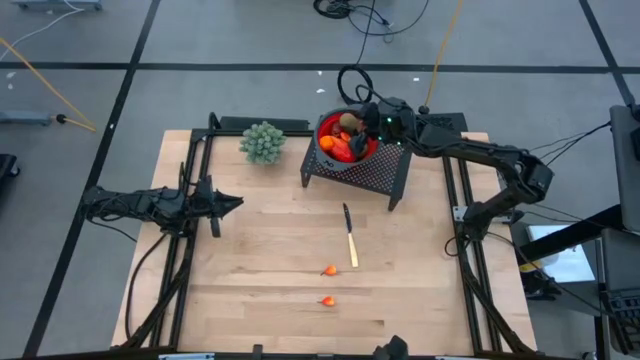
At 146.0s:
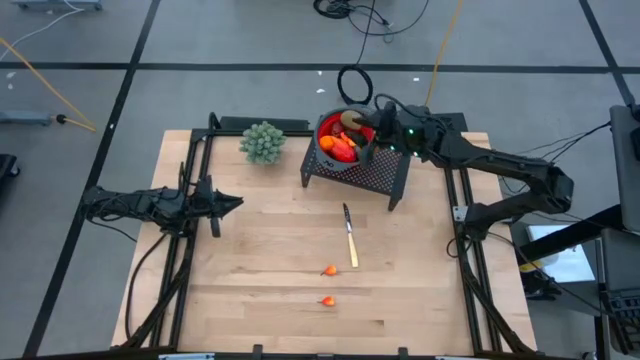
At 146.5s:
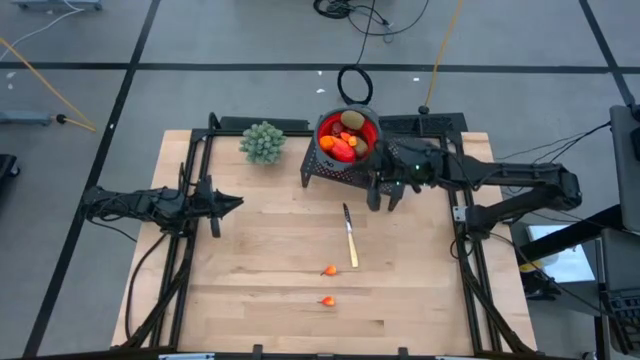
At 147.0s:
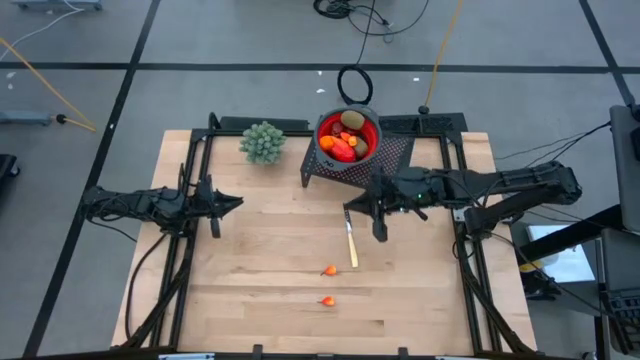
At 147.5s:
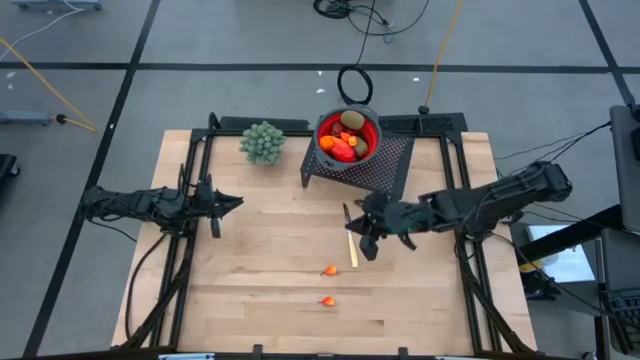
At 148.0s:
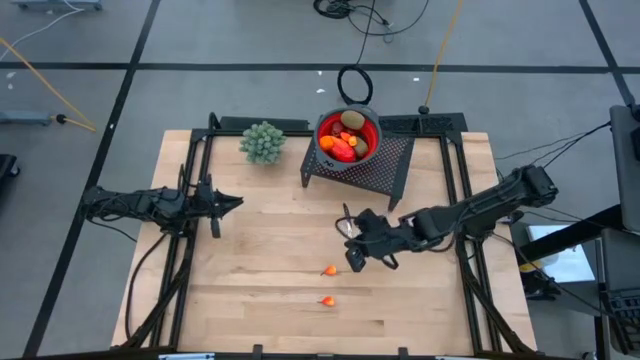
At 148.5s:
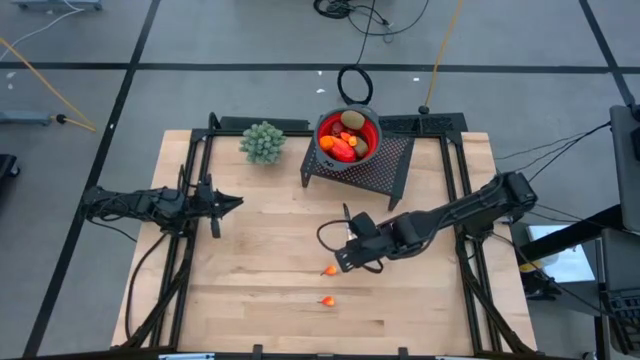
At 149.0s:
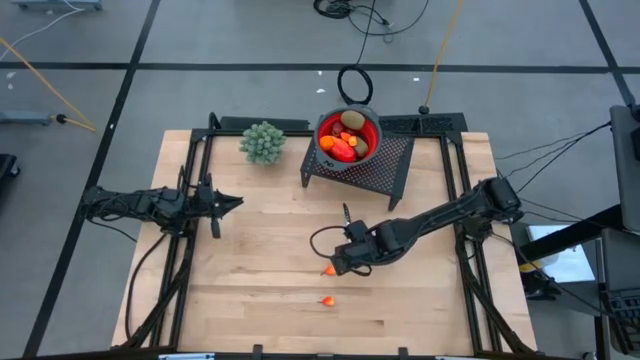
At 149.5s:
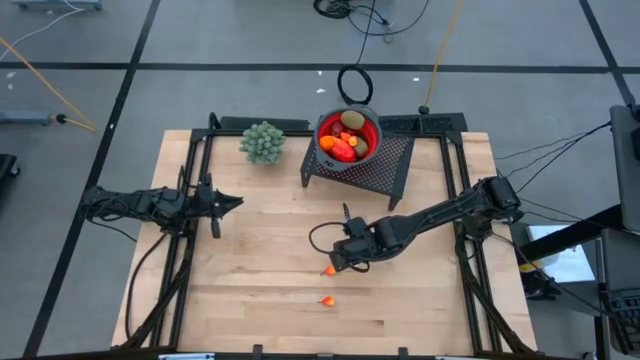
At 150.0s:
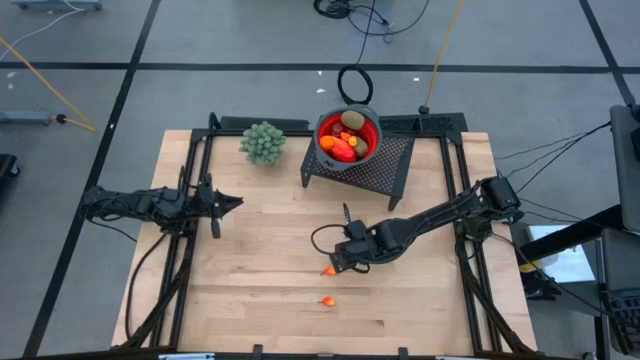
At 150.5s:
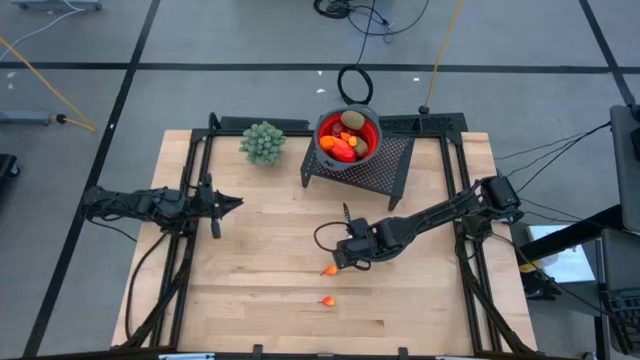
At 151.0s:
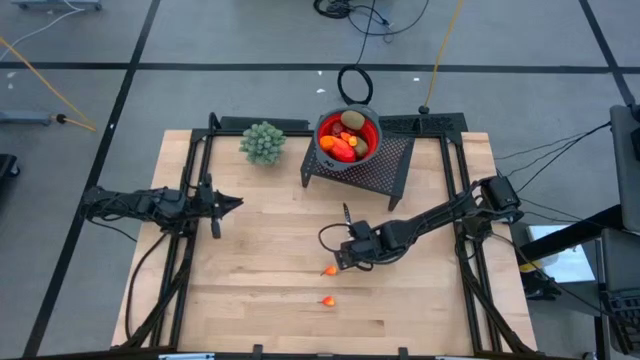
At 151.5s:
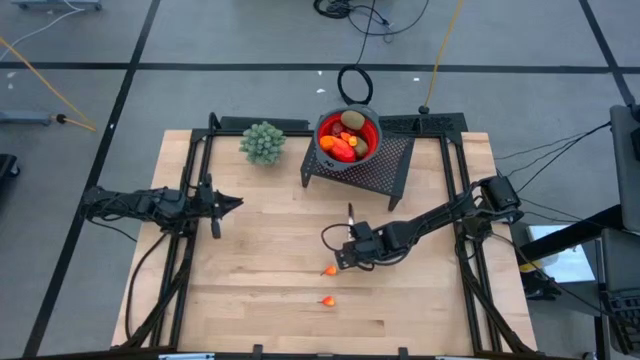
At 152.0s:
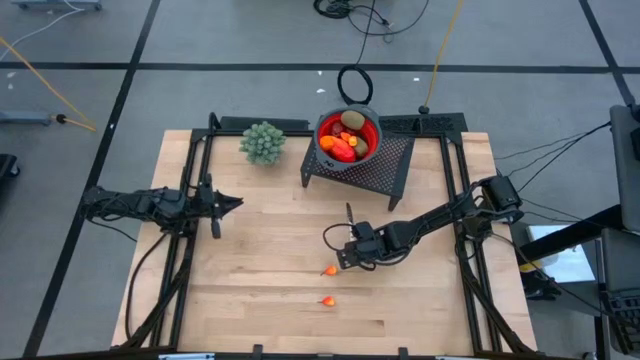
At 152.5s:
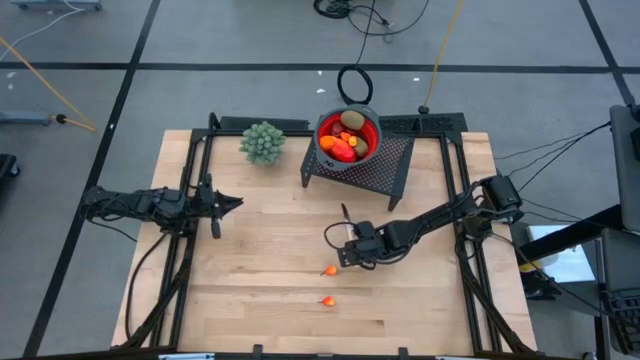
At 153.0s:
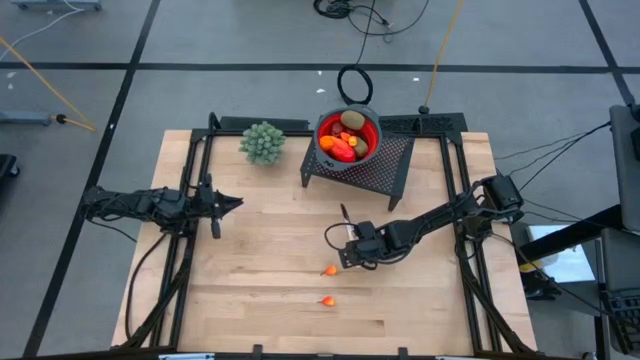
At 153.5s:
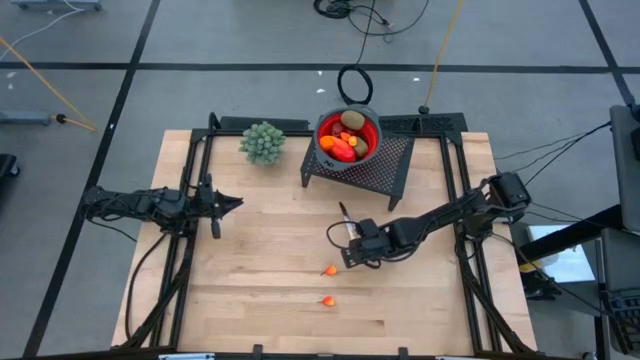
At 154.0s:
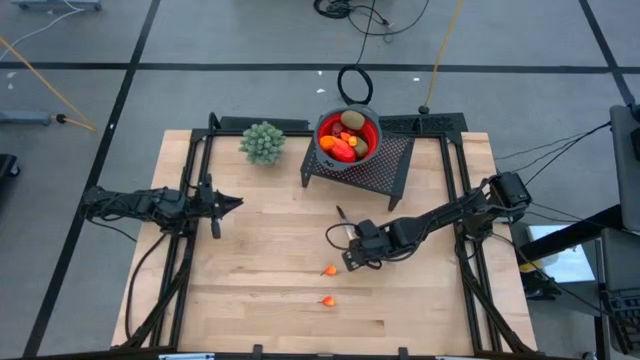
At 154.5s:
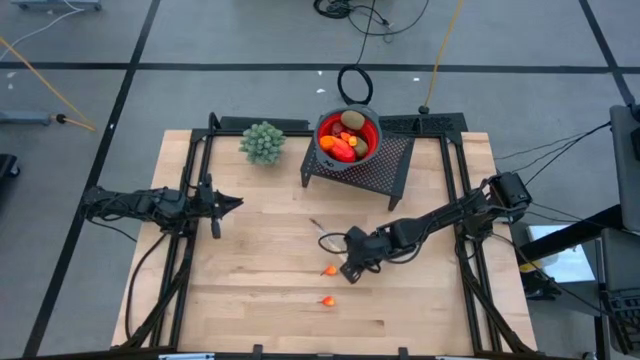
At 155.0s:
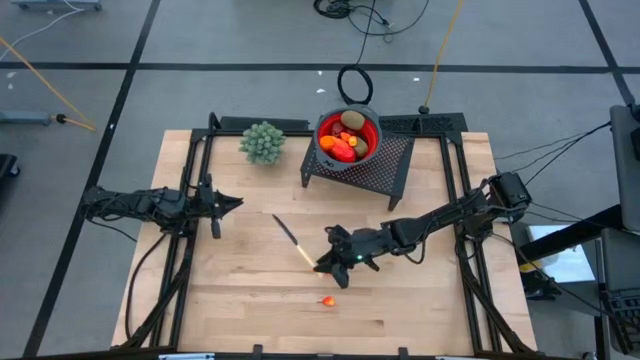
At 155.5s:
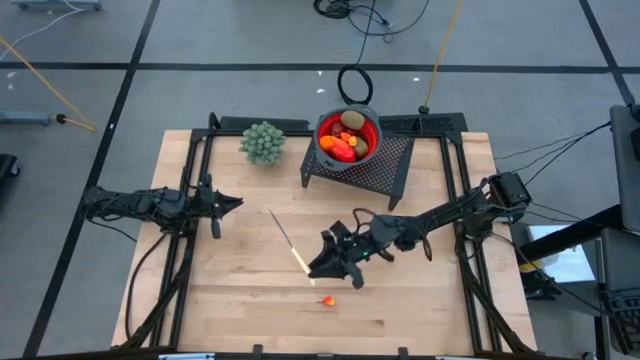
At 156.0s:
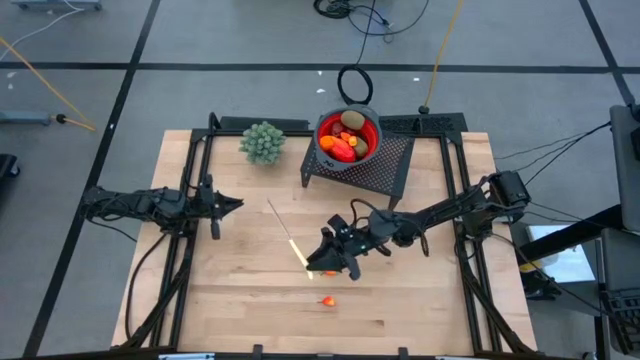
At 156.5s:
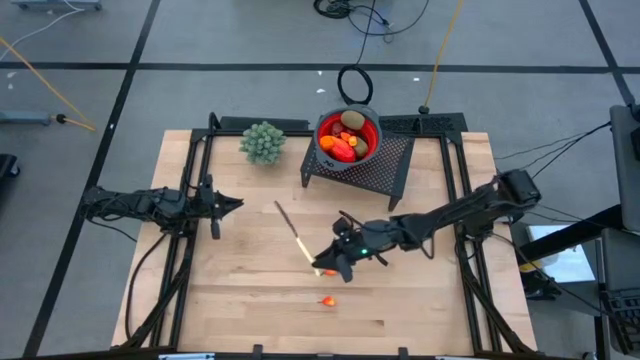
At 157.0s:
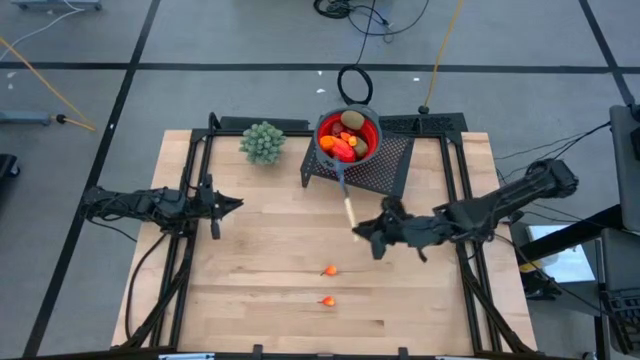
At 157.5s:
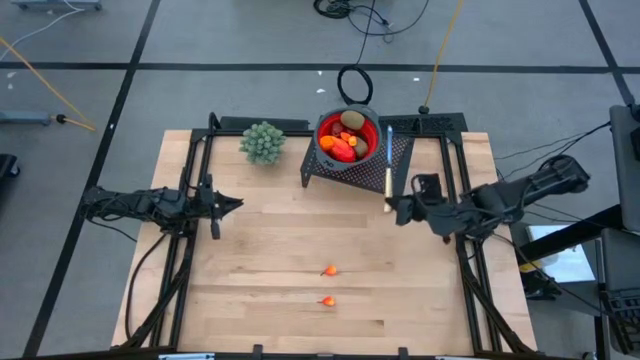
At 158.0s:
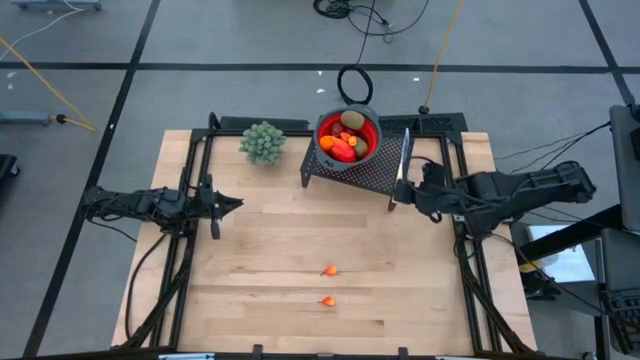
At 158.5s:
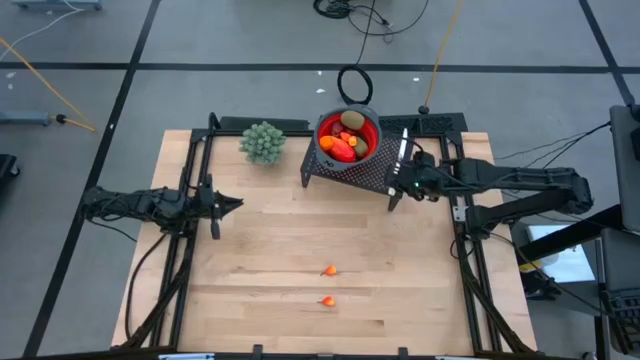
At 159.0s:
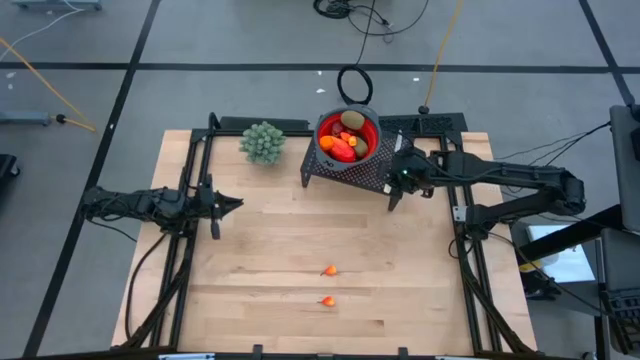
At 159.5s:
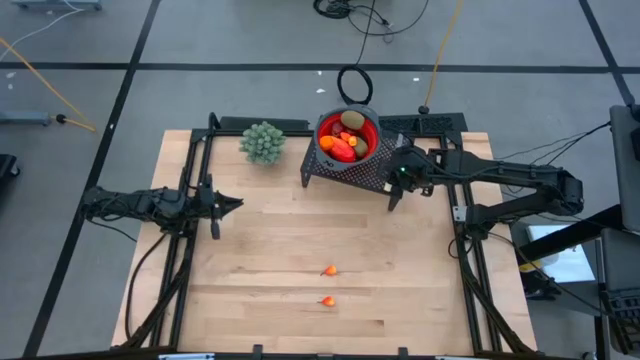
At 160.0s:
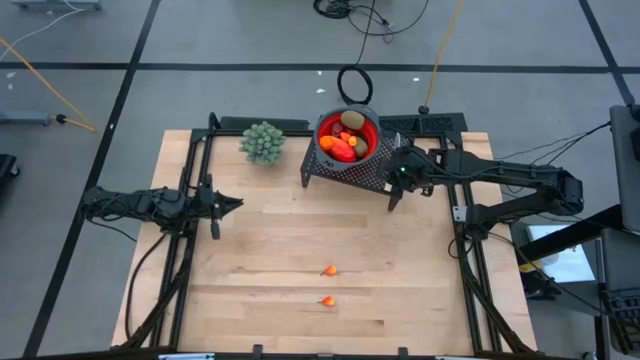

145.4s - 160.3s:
Task: Pick & Place Fruit
Put the yellow knife on the shelf

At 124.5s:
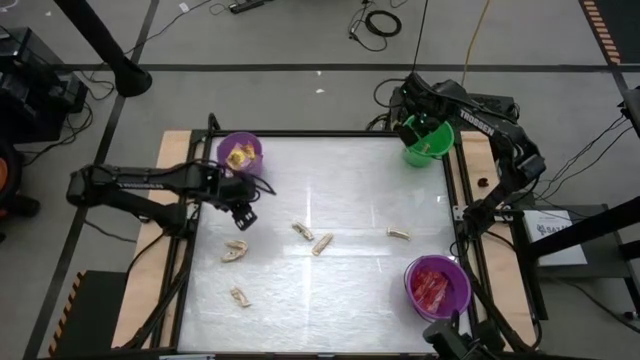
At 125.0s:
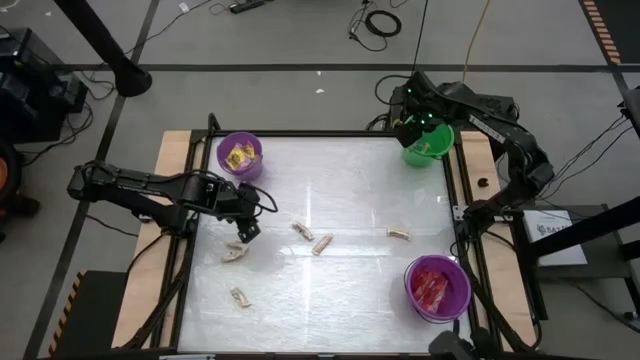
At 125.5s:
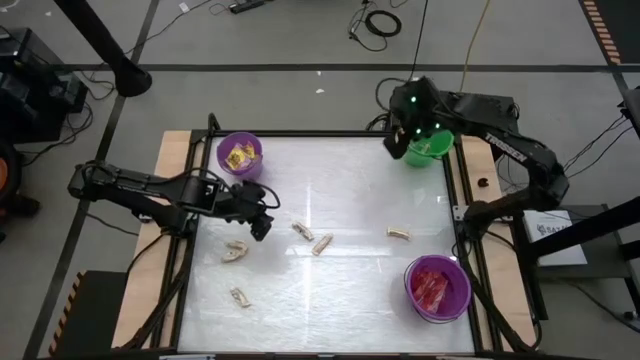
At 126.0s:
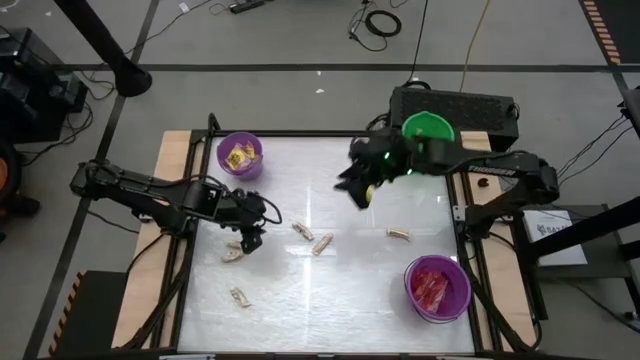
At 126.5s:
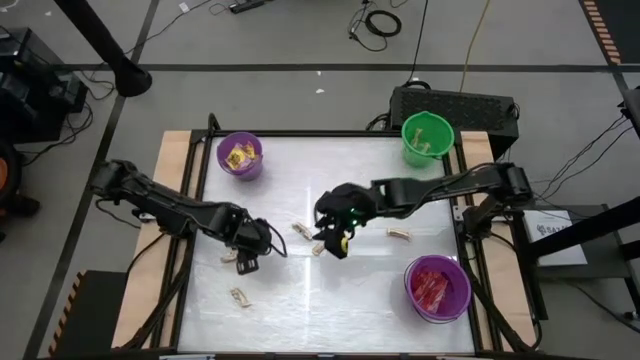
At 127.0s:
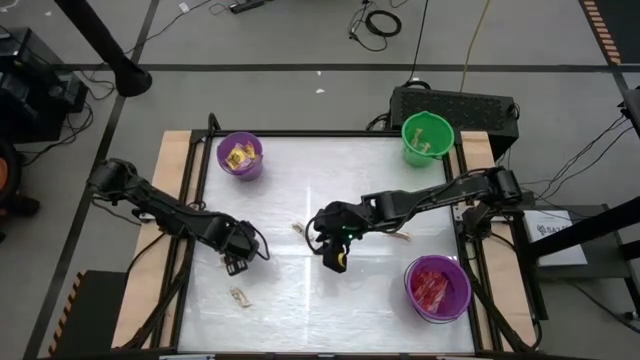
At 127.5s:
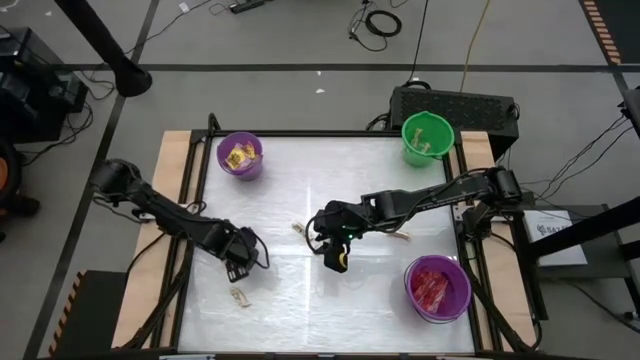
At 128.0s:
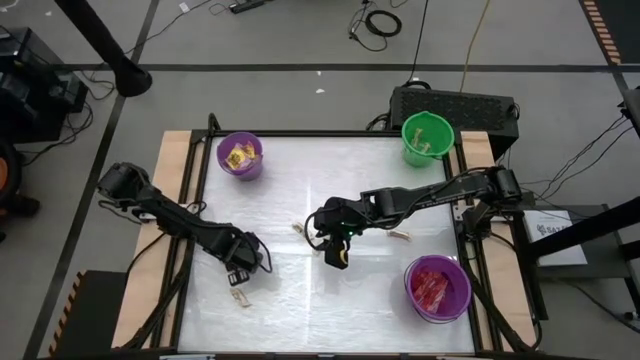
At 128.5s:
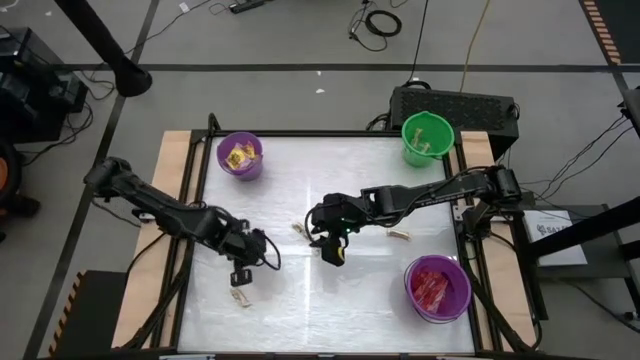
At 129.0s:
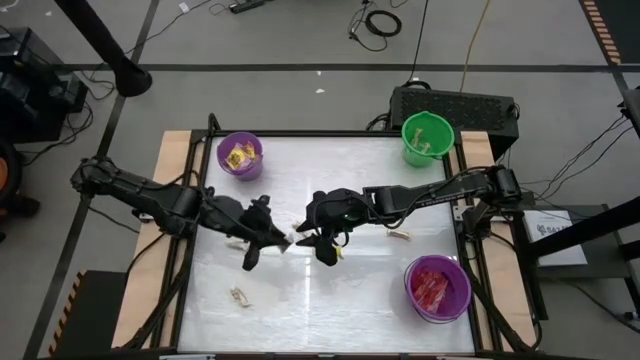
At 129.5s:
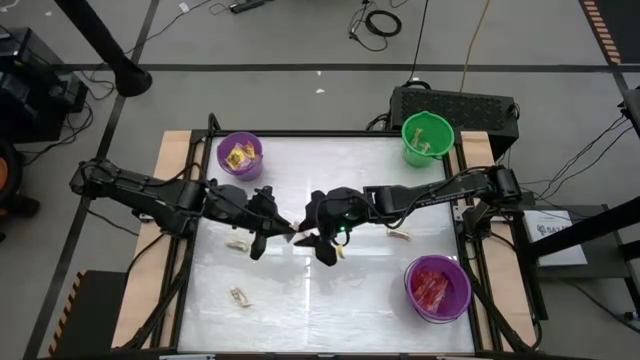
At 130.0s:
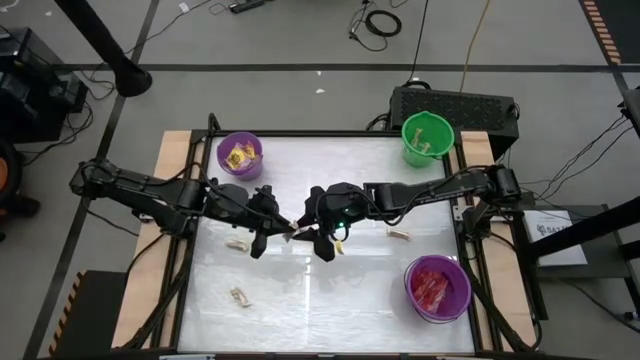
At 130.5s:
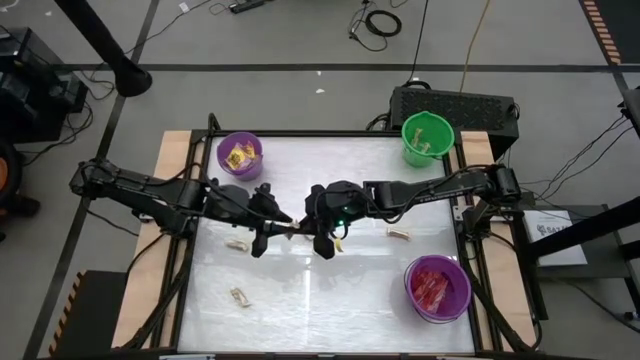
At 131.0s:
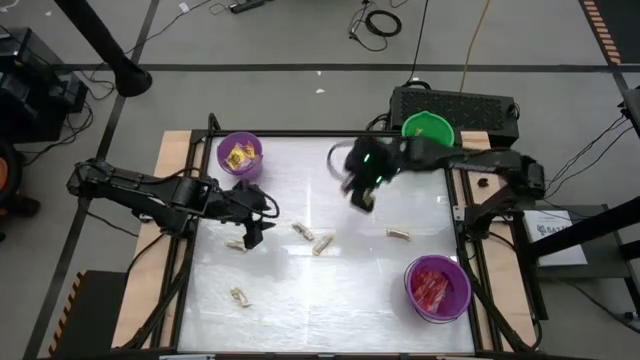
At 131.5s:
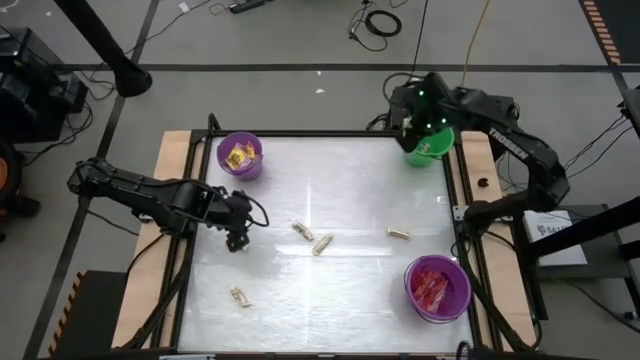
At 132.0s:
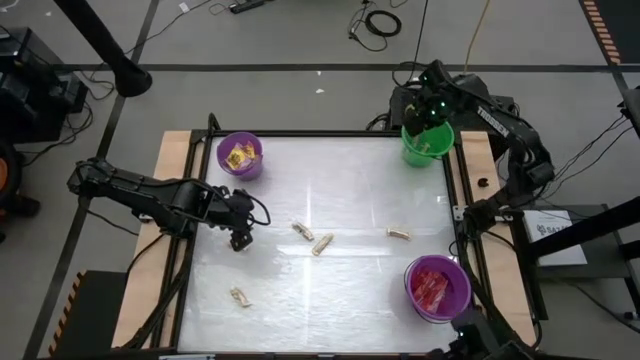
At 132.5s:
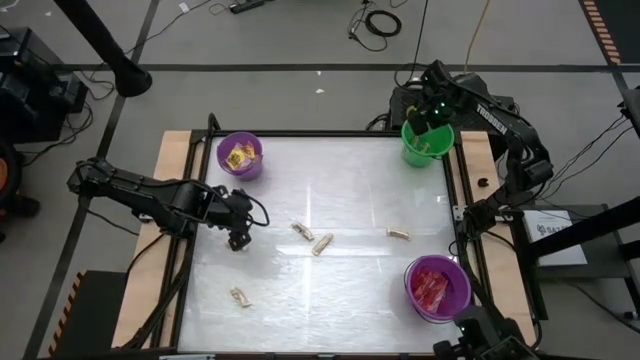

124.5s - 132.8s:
Task: Sort candy by brand, put in halloween buckets
Put the white candy into the green bucket
